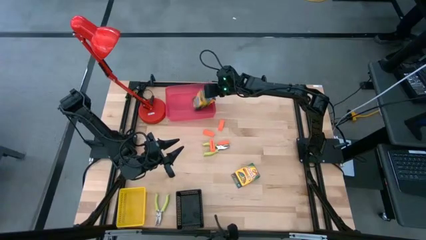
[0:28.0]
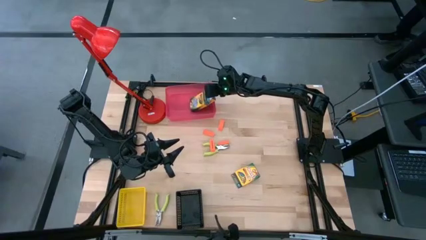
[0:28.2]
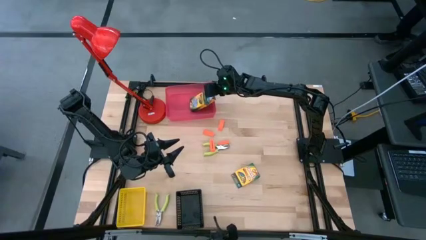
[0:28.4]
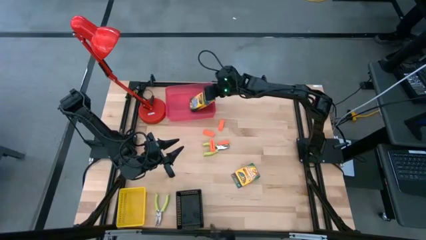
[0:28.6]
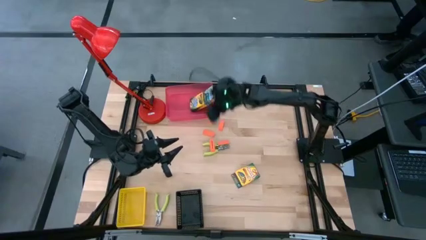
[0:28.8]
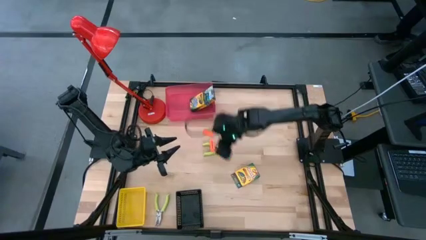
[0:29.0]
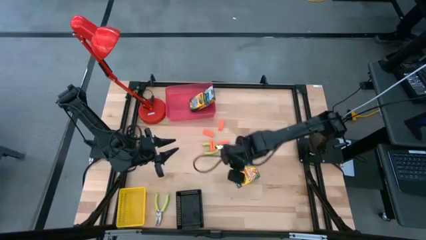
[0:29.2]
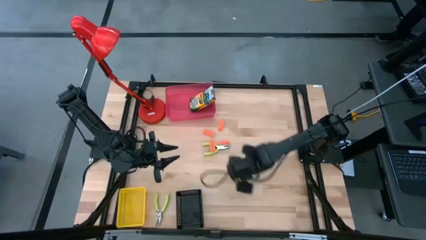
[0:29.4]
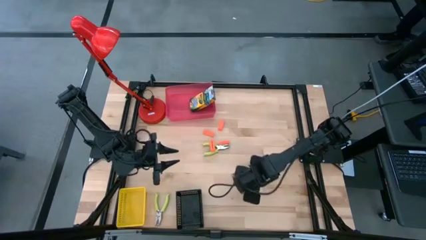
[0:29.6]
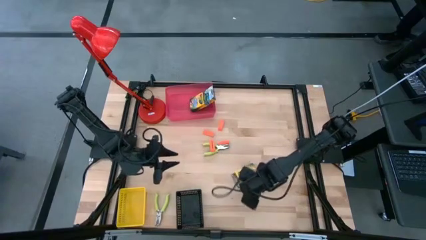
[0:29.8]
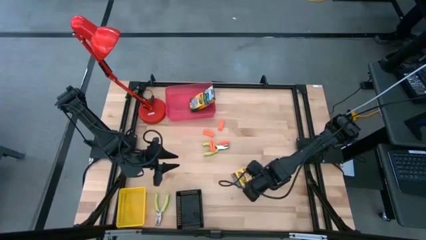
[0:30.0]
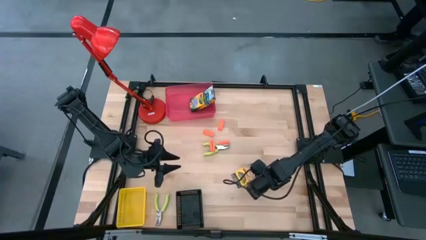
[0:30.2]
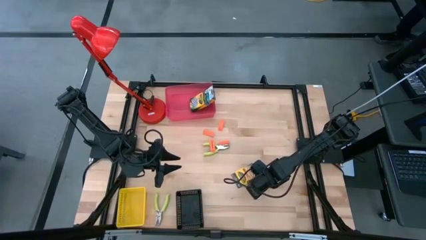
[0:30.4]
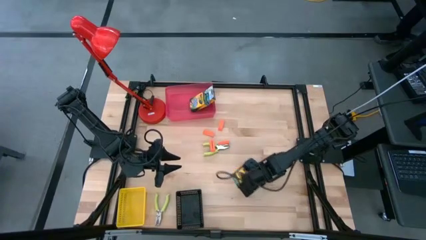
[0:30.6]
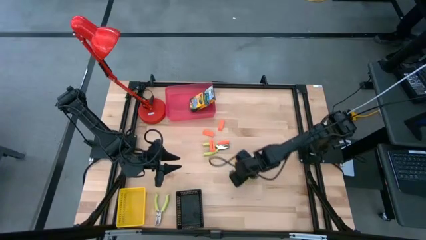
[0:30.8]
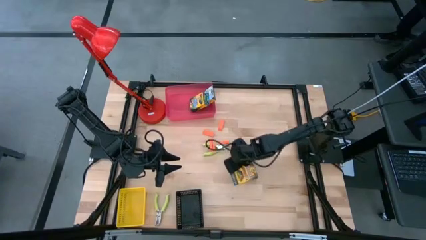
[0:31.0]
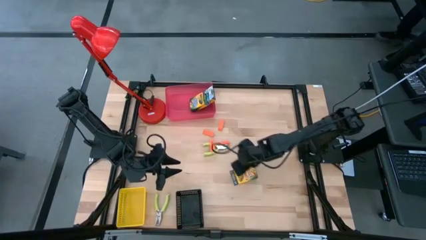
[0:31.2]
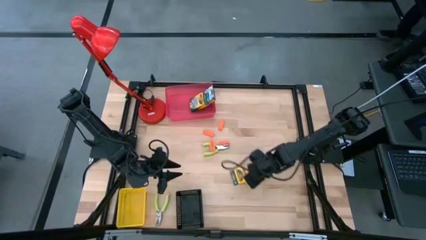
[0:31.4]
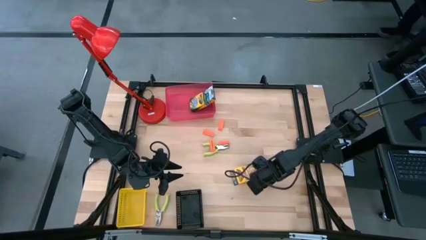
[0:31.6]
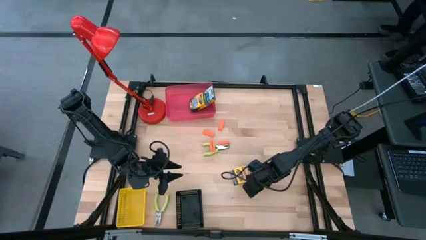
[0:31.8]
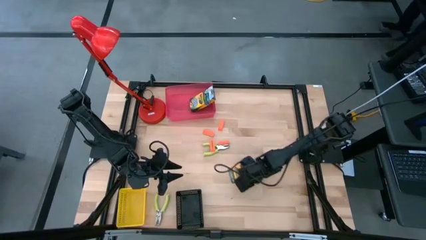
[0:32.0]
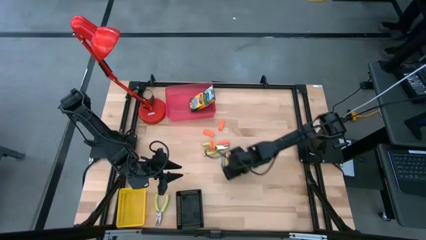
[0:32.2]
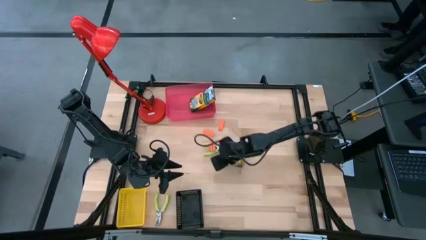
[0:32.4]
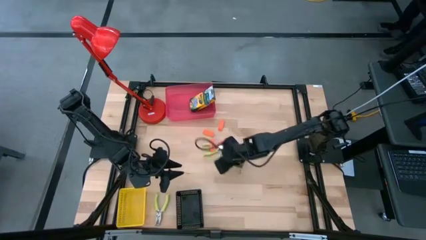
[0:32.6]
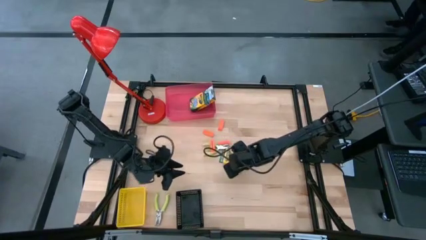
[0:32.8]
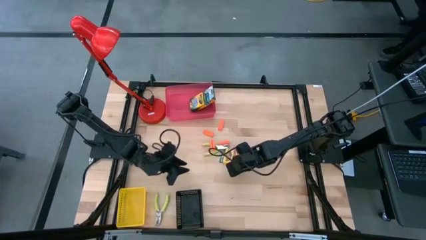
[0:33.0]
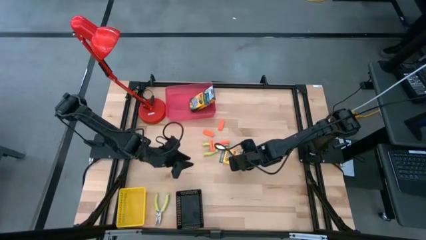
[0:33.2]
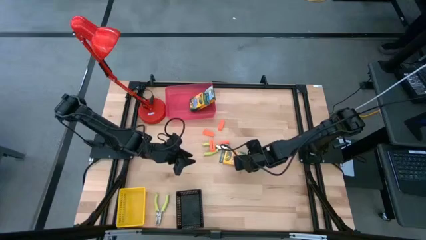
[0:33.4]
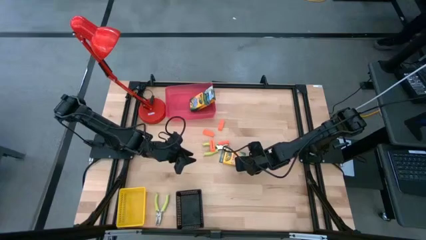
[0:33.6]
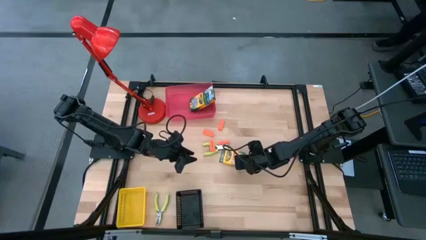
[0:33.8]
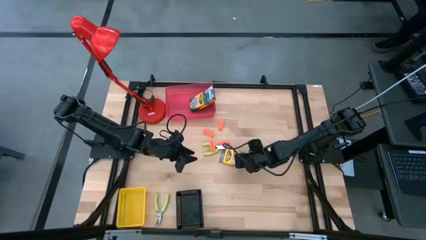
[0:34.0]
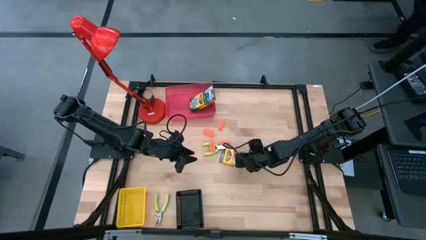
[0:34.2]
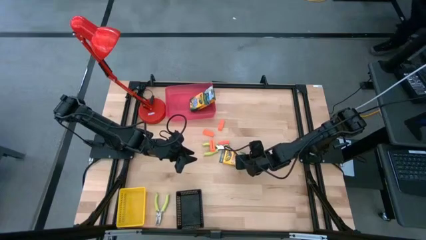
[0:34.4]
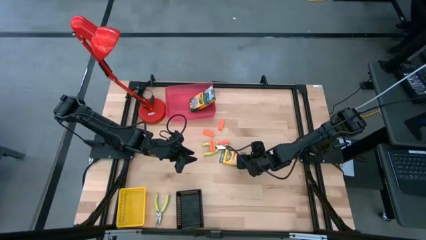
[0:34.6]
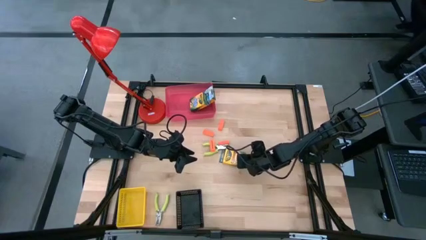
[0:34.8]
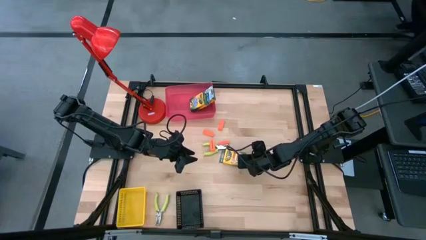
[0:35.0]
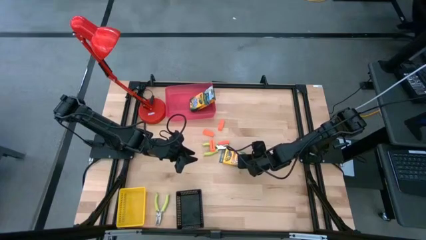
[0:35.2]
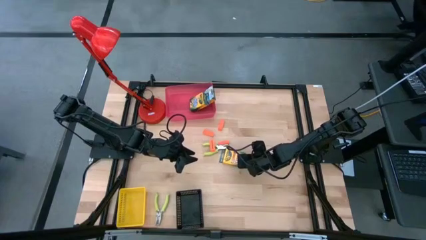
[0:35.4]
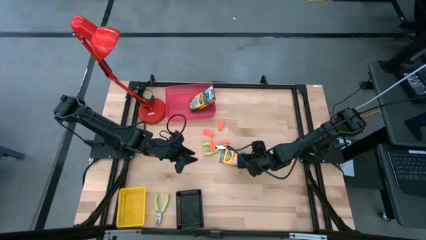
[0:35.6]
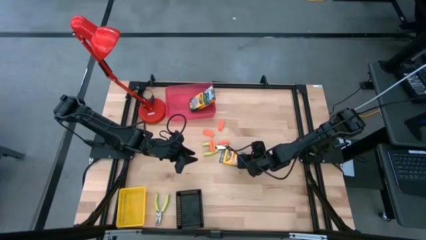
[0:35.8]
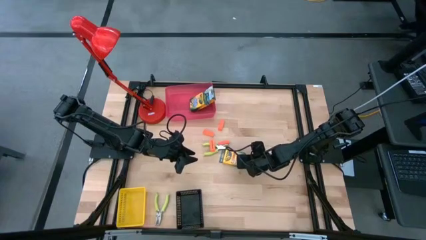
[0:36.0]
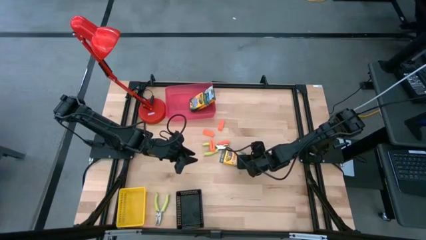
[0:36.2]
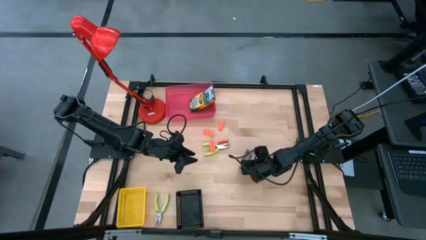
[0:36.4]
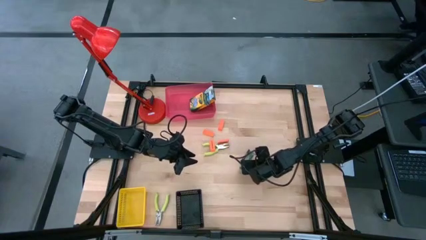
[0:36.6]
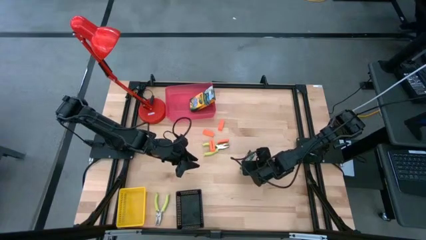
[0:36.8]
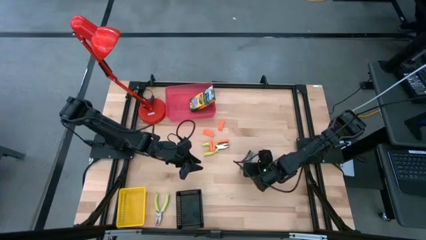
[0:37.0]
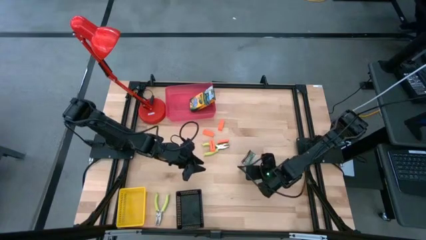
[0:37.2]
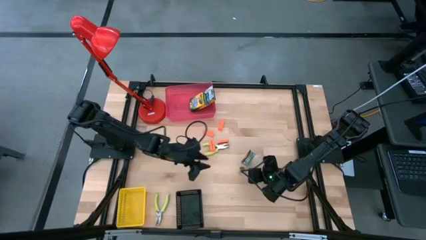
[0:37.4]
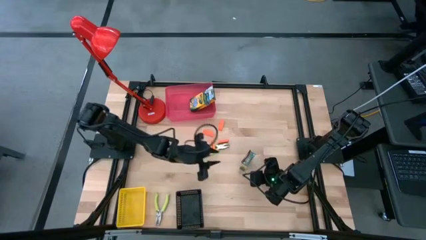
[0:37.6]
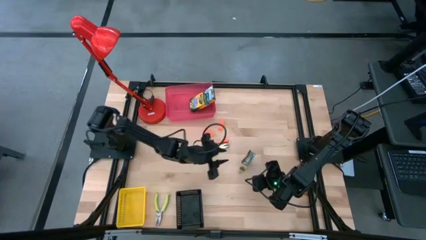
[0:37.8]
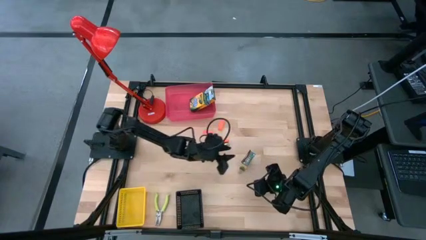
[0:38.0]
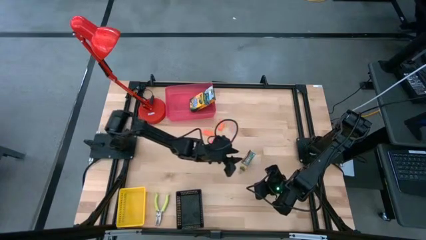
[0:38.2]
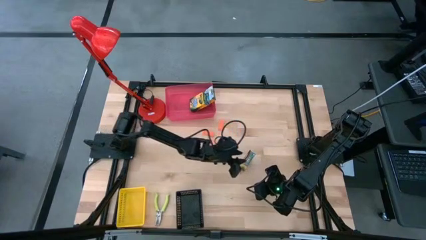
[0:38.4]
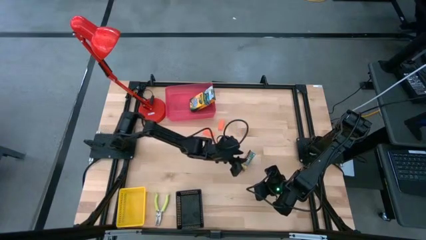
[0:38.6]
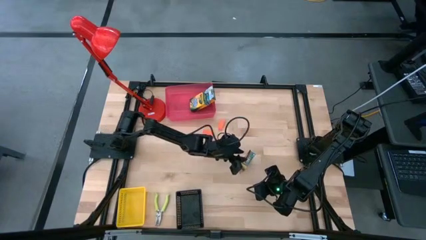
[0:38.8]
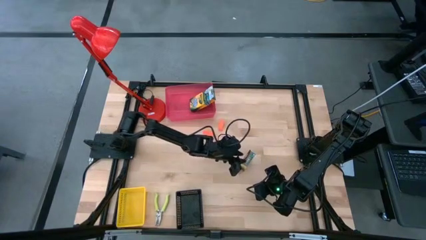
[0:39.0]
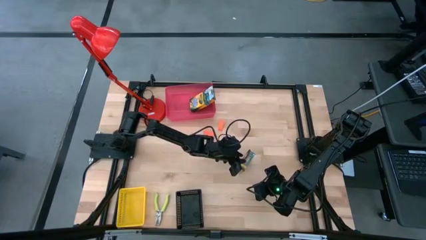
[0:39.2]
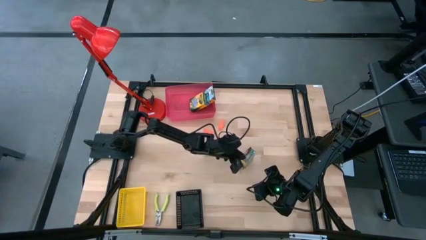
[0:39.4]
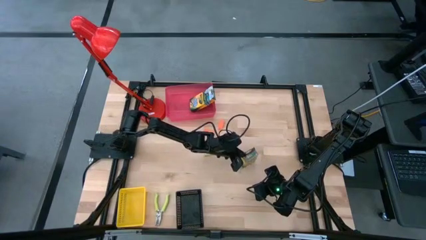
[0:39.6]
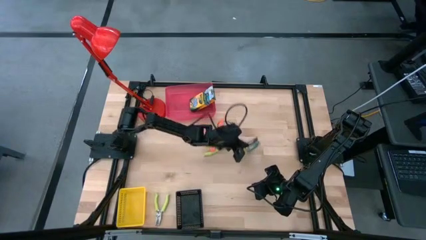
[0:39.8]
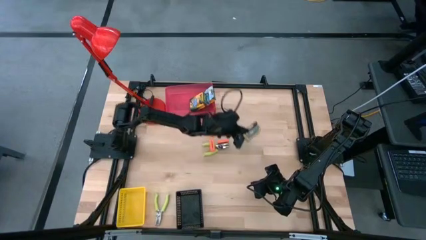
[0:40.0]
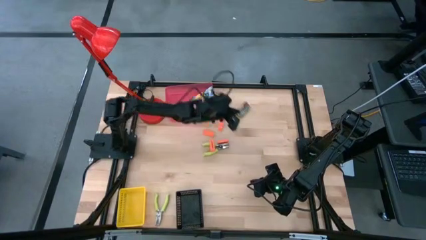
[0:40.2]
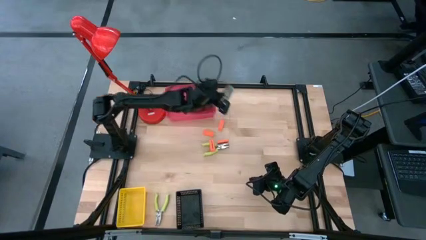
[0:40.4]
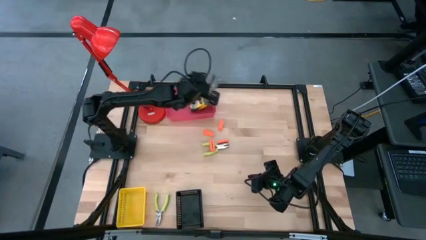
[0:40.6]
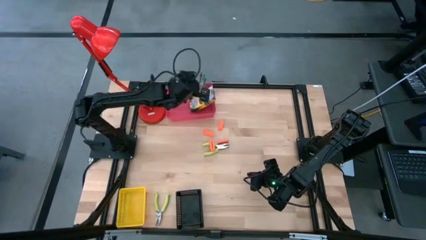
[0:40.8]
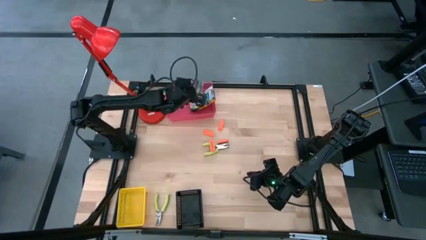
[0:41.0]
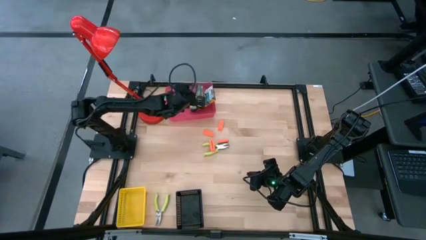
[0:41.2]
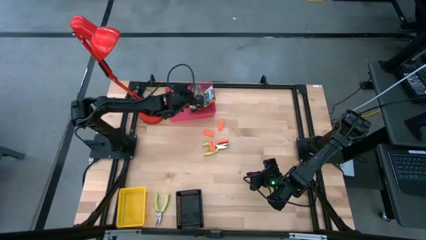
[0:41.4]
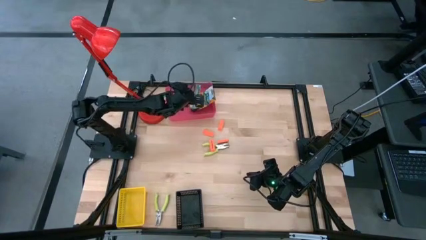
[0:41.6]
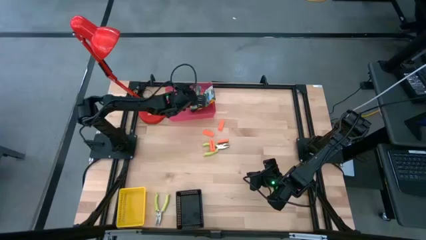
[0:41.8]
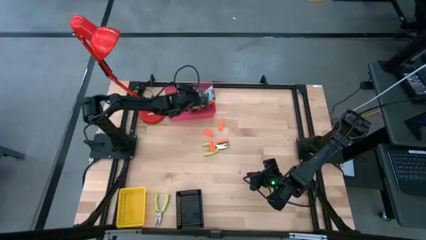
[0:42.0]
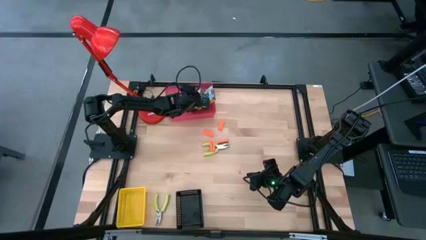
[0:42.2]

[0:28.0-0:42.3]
Task: Pick & Place School Supplies
Put the crayon box into the red bin
